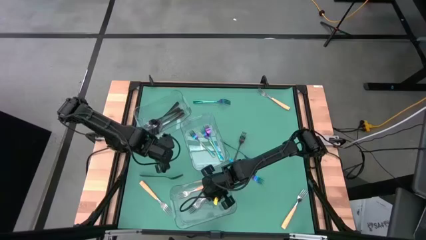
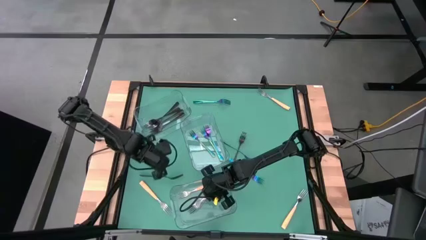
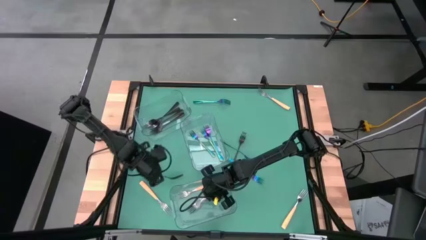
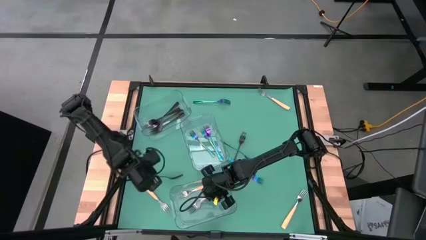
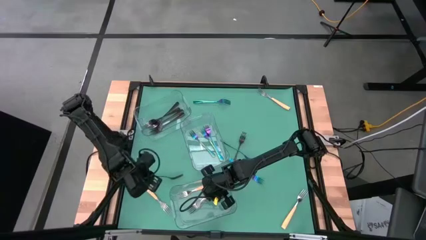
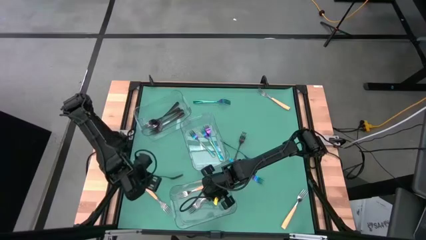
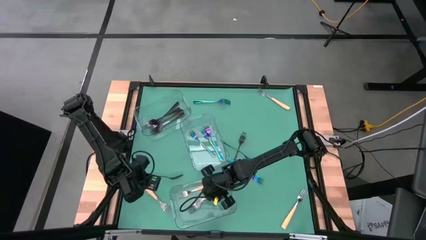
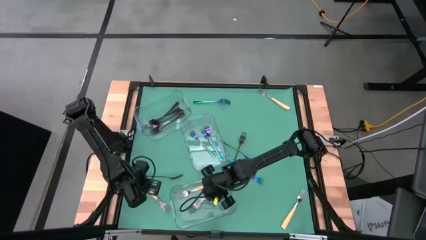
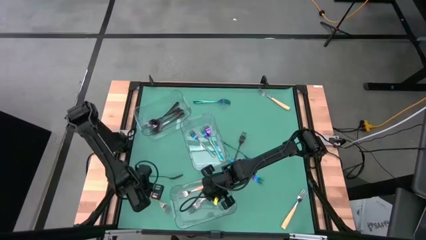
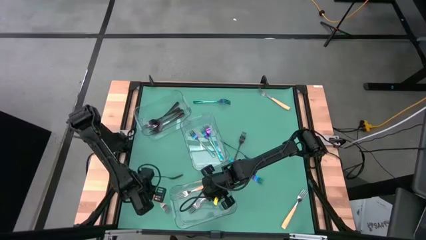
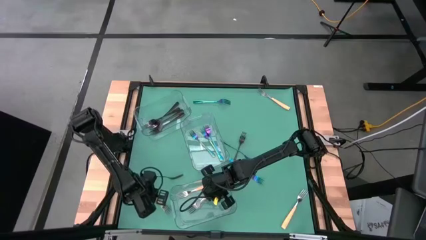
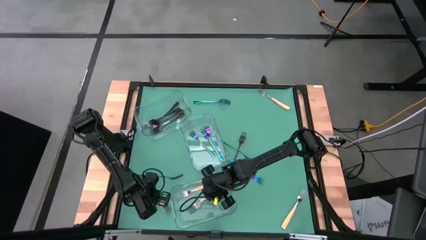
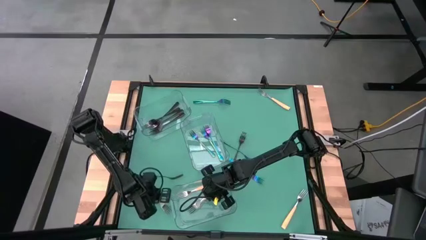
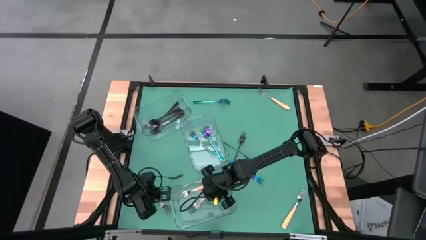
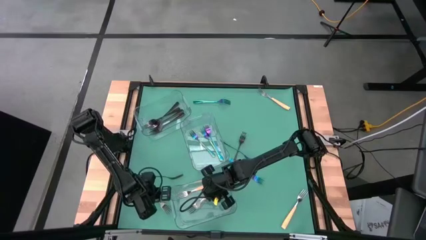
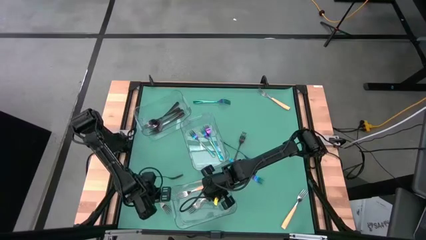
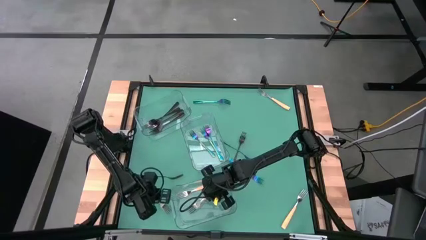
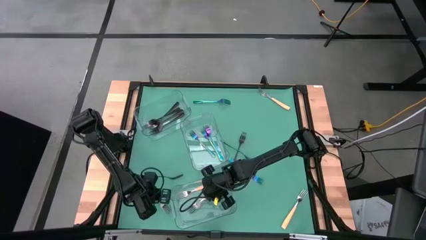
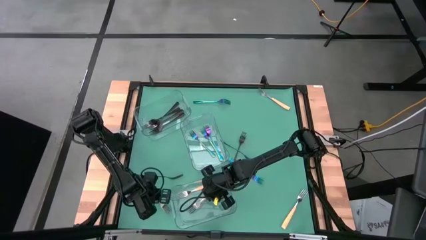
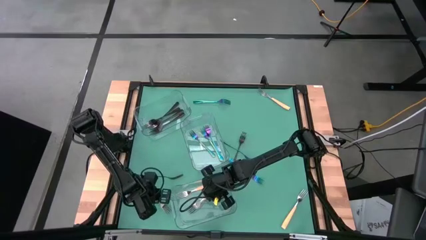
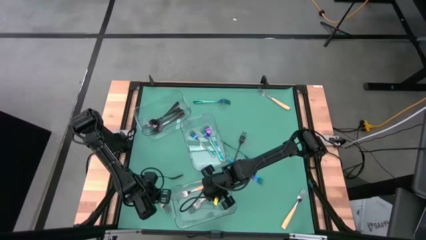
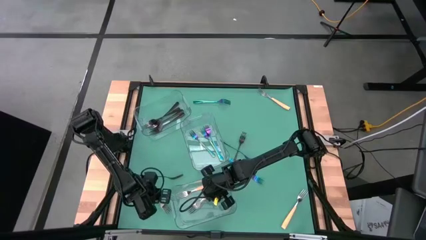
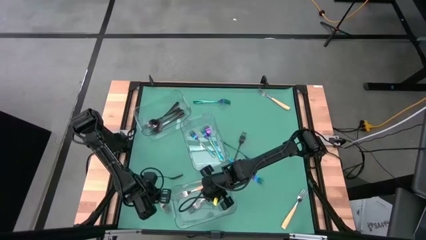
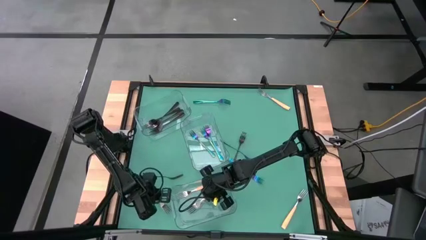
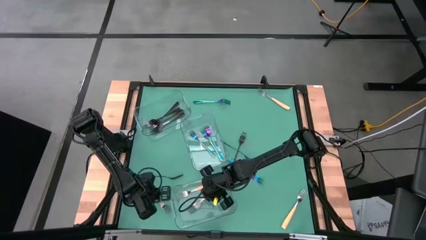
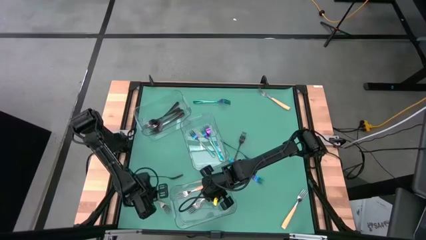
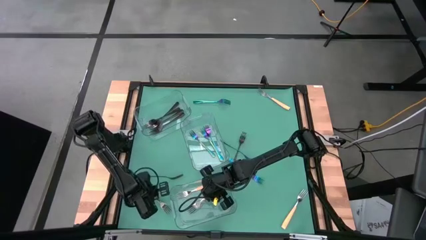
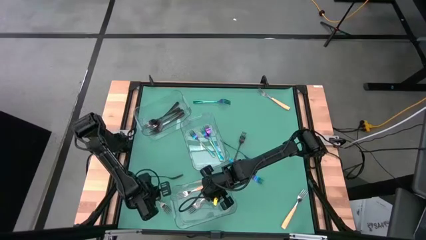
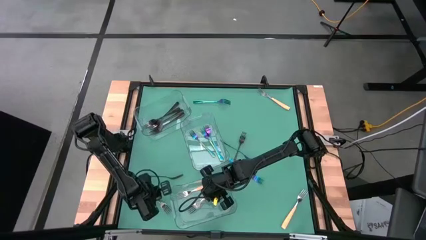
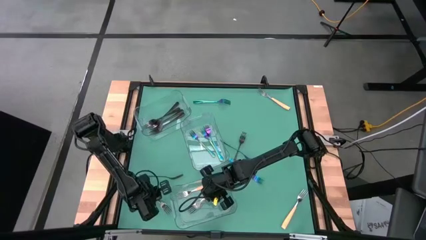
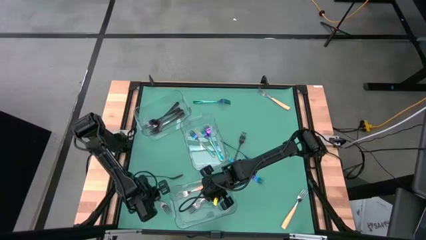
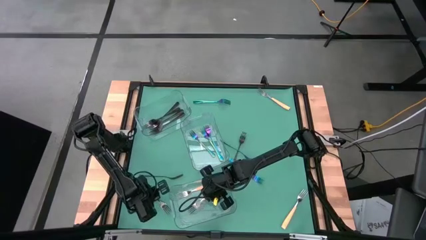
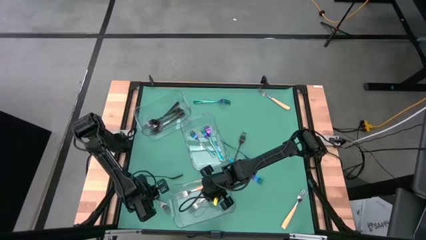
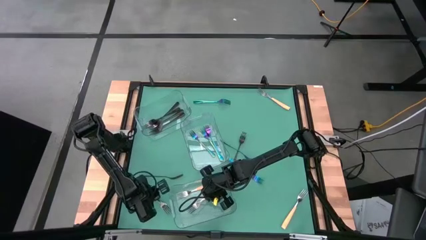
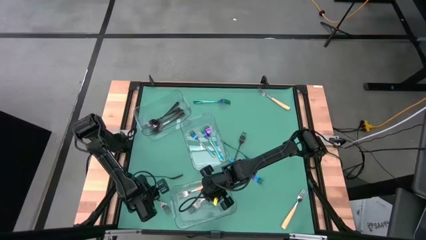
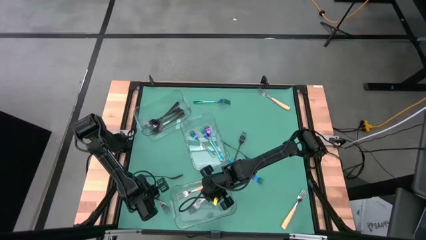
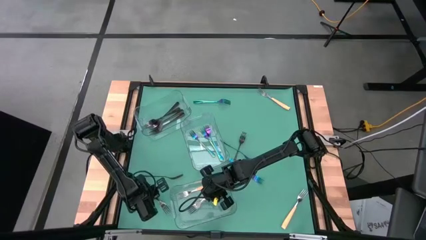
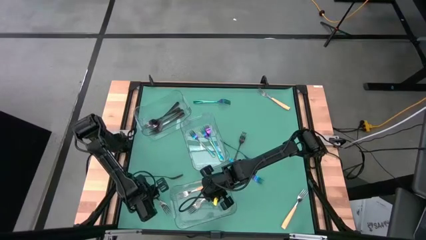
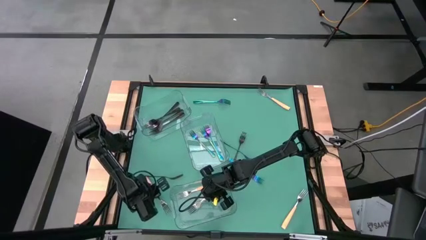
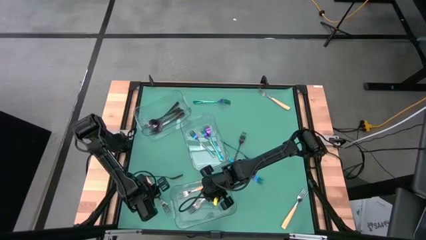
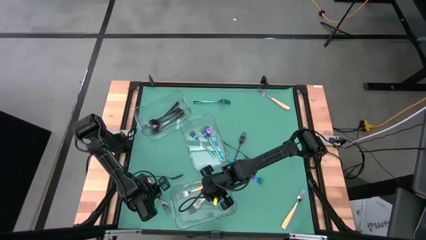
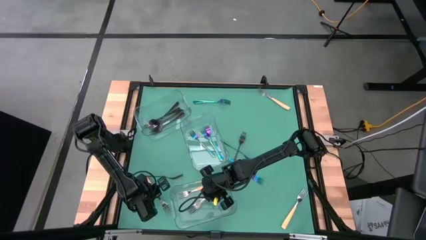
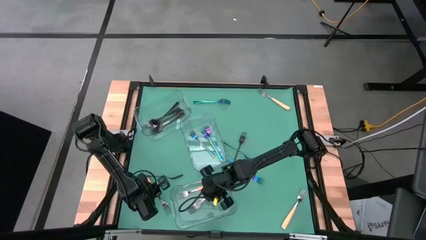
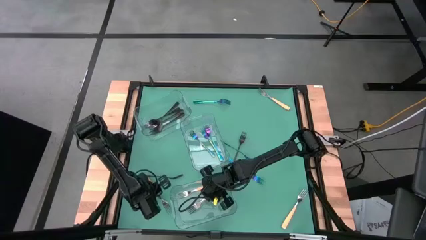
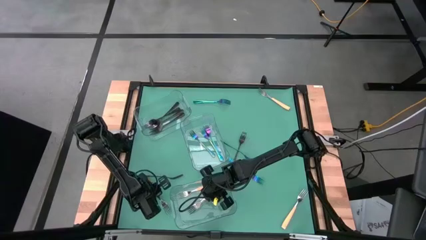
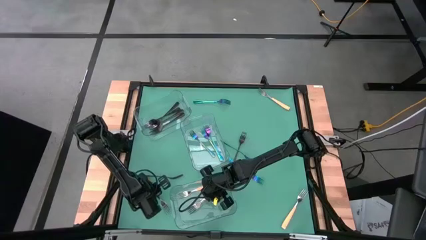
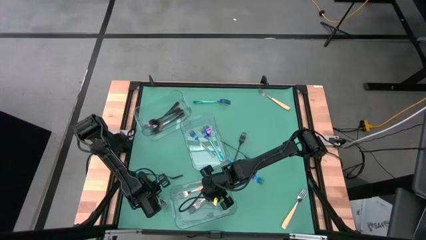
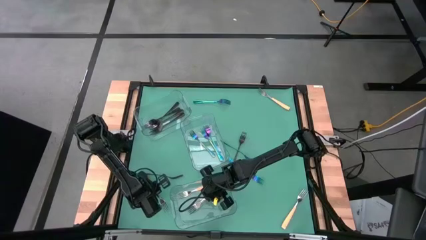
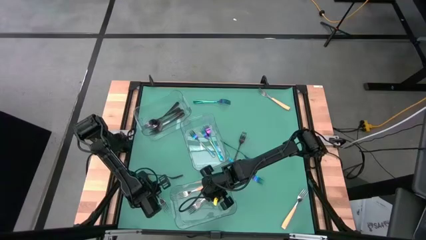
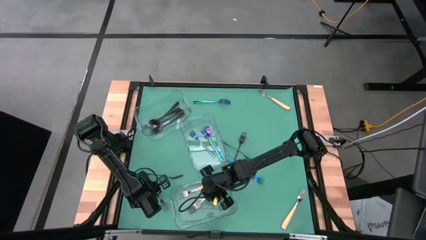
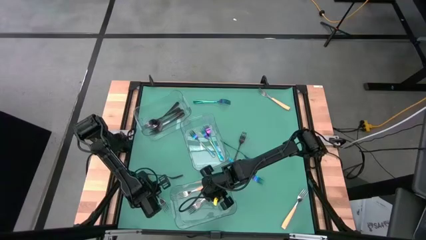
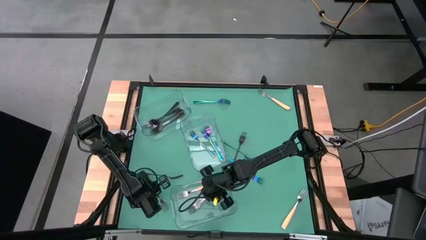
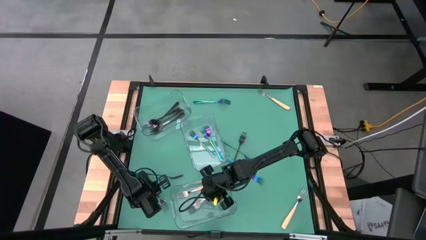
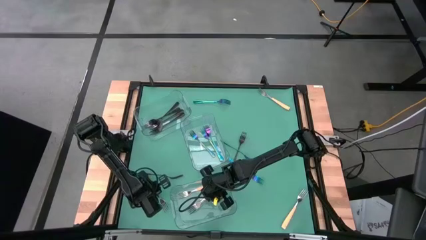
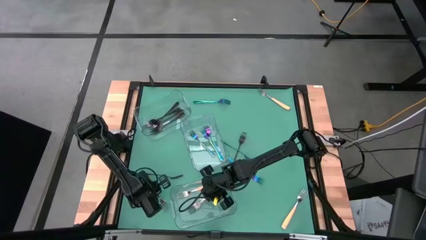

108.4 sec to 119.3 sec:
Task: Sort silverware by color (type)
Put the yellow fork into the bottom transparent bin

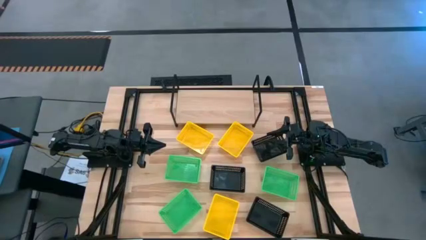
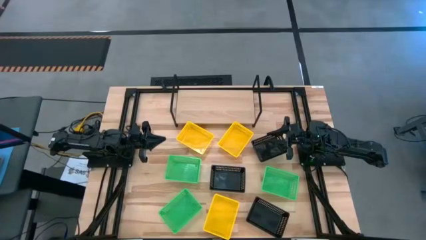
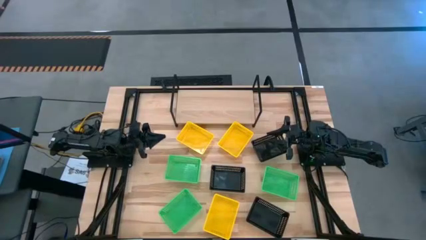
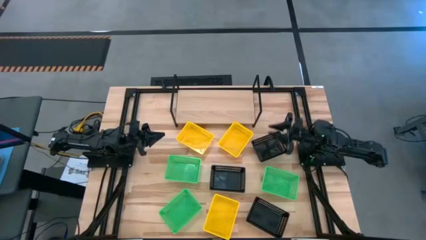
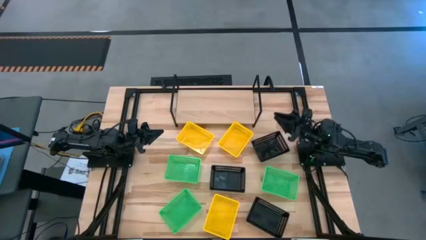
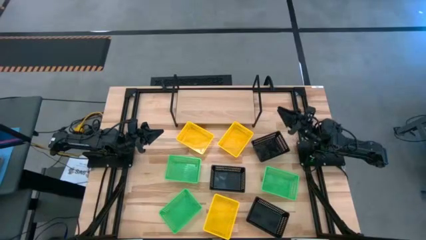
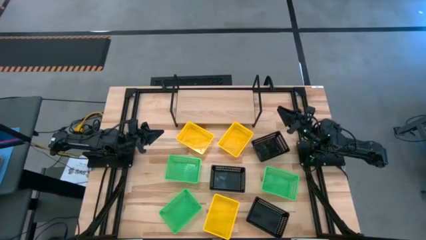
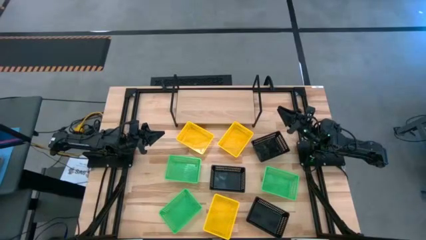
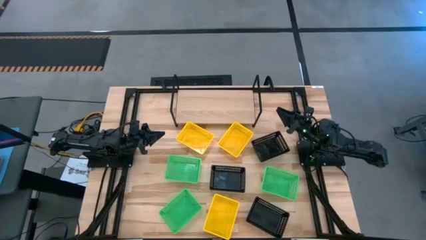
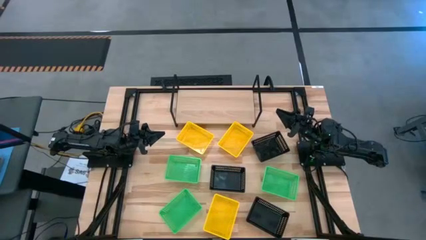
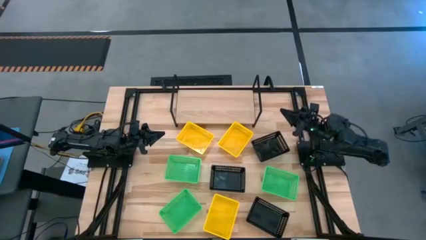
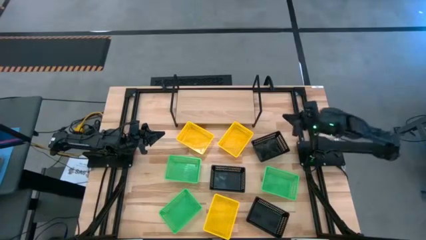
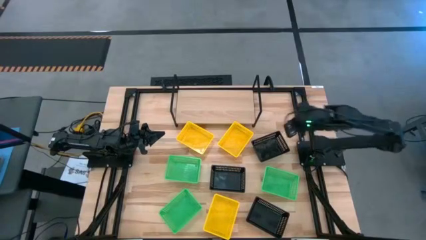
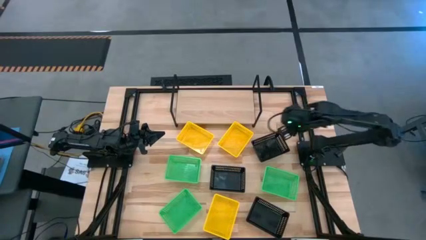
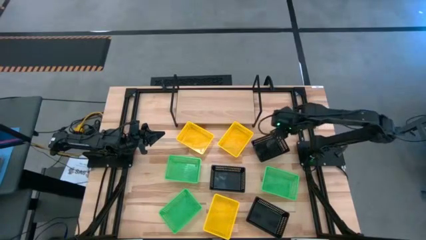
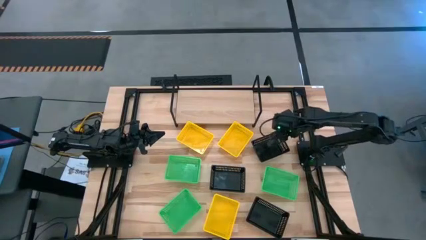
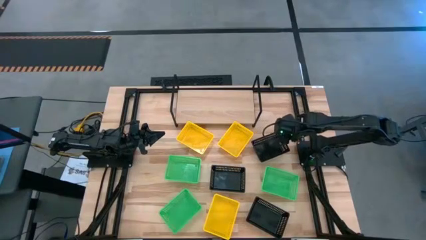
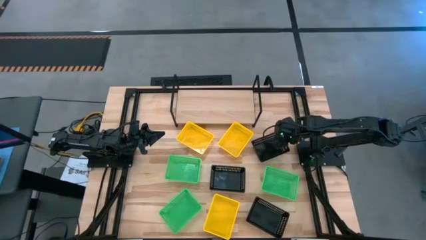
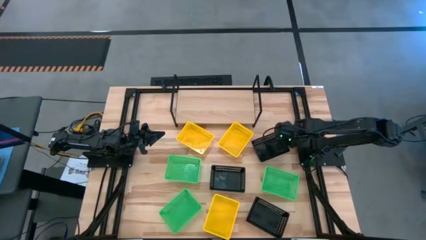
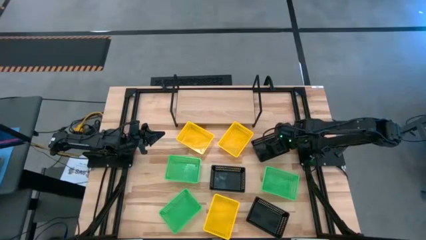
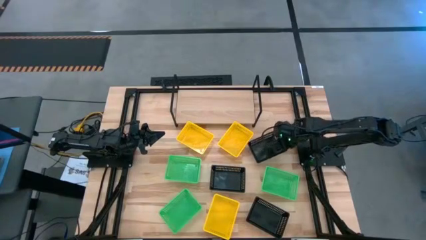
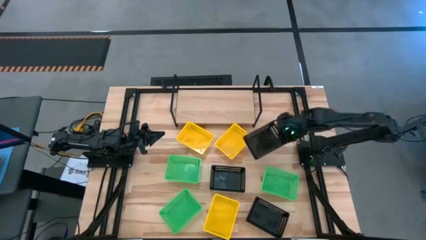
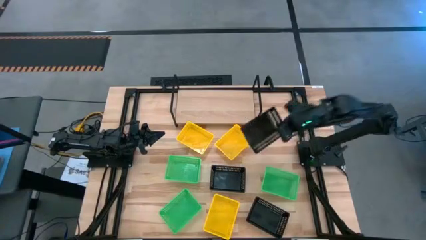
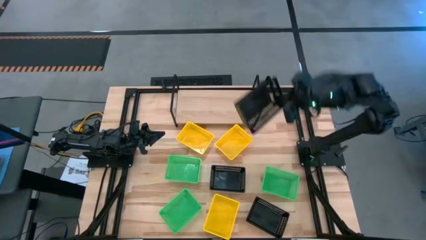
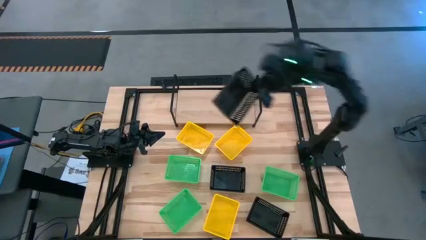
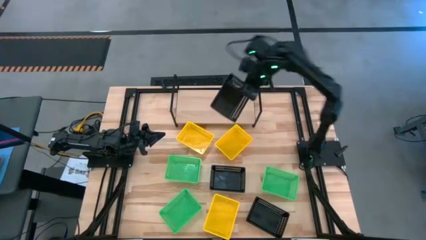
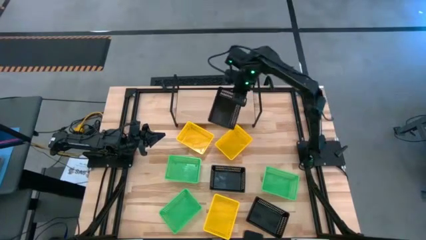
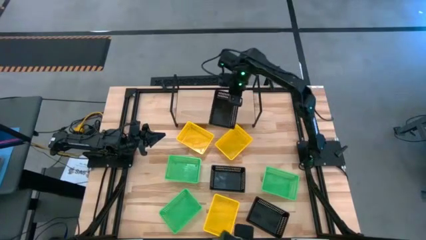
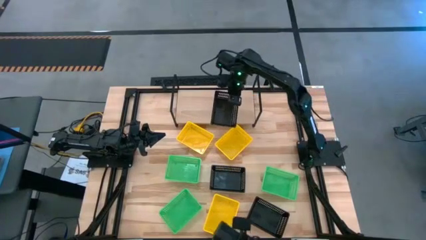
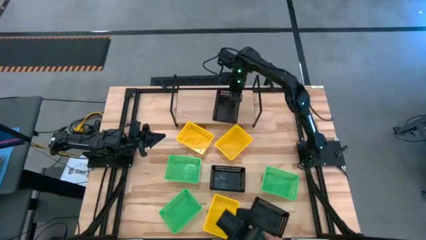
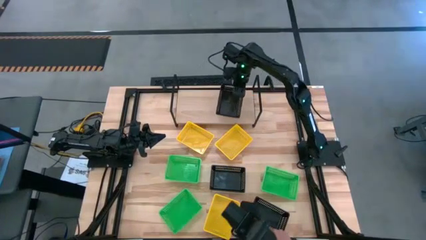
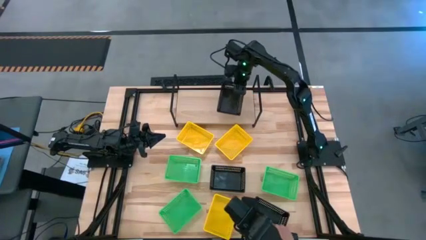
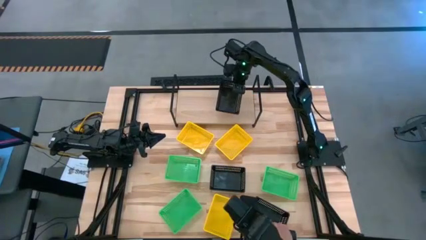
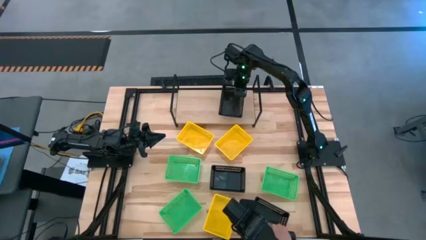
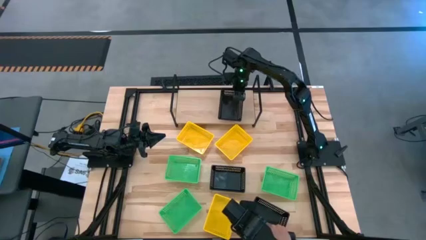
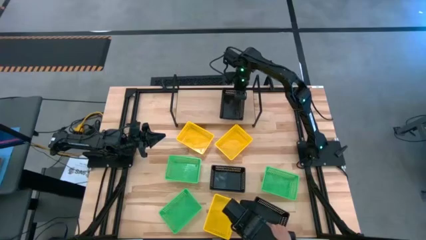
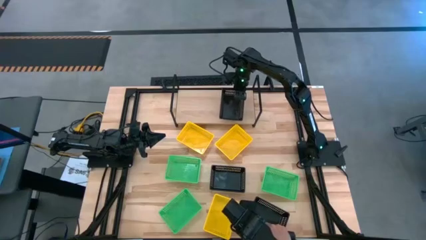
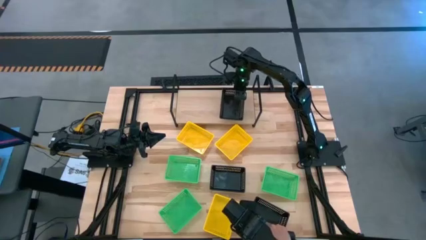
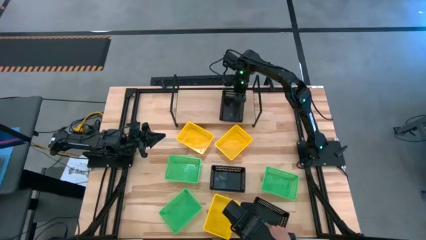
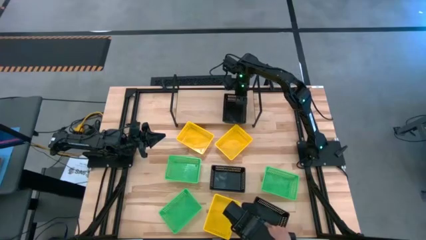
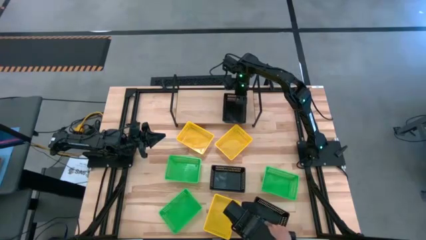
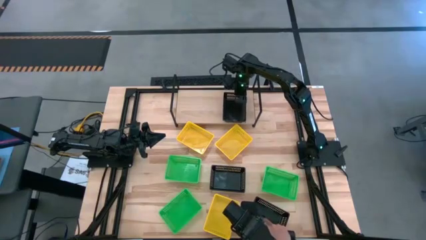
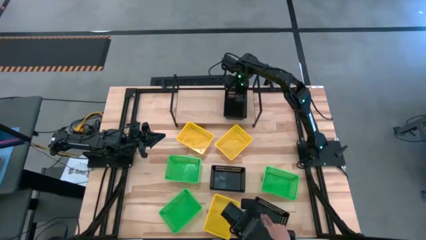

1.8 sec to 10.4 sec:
Task: Stack baskets on shelf by color
Put the top black bin on the shelf
